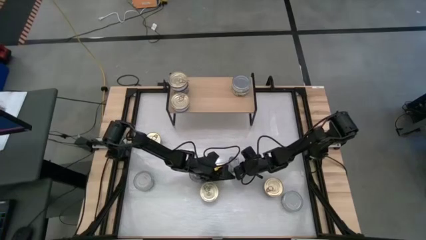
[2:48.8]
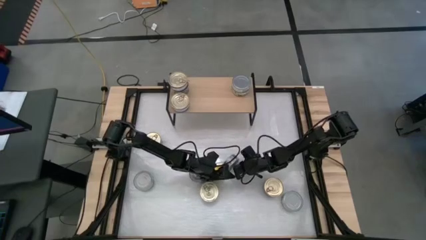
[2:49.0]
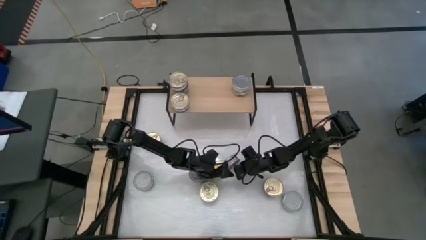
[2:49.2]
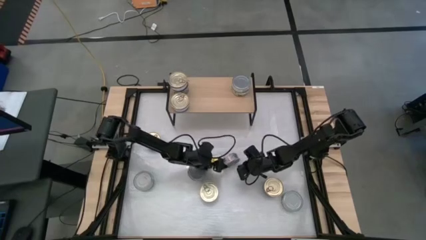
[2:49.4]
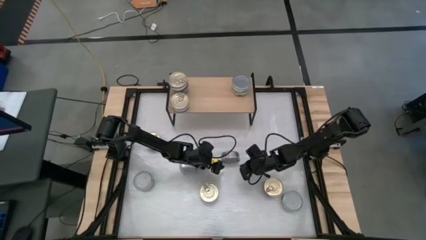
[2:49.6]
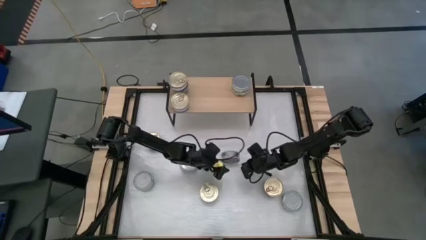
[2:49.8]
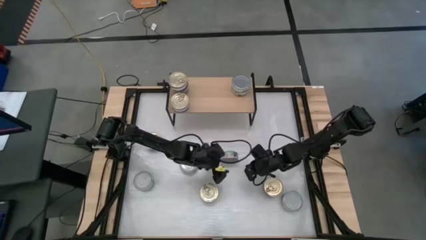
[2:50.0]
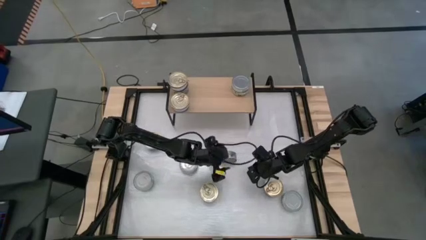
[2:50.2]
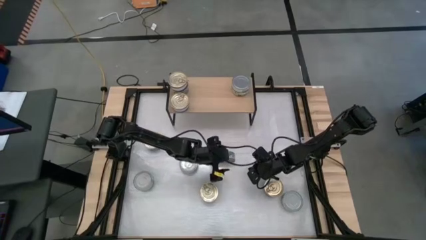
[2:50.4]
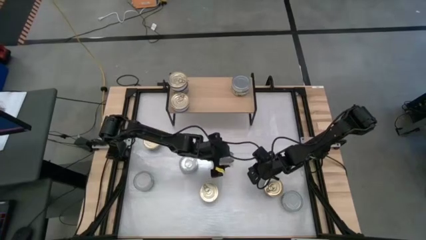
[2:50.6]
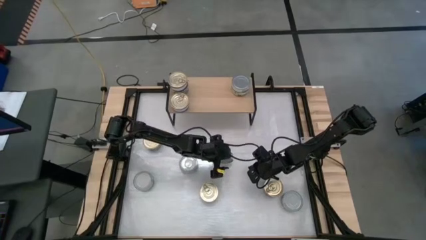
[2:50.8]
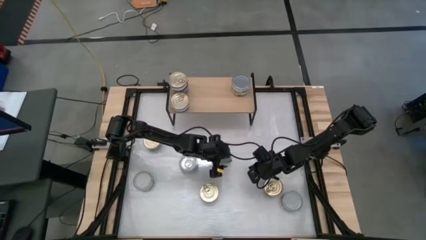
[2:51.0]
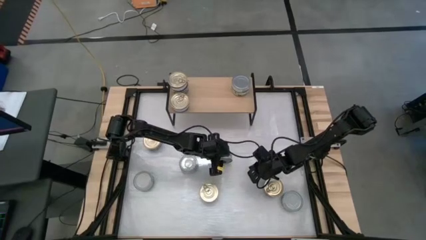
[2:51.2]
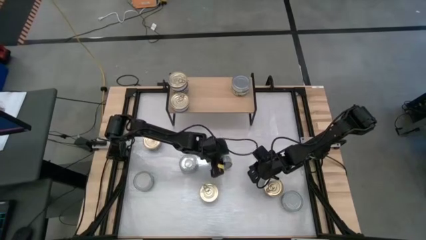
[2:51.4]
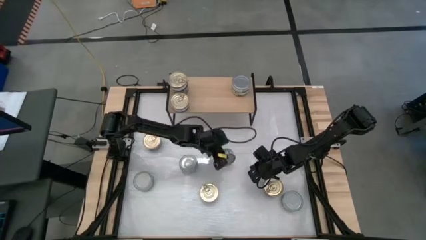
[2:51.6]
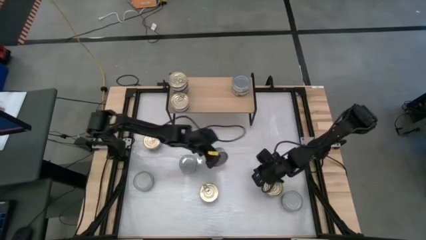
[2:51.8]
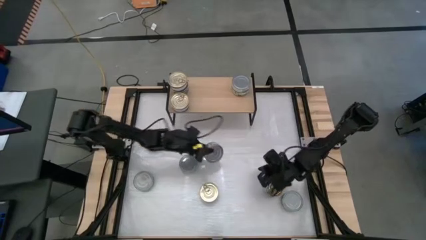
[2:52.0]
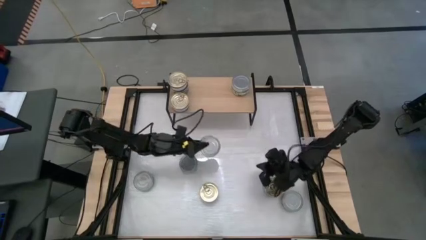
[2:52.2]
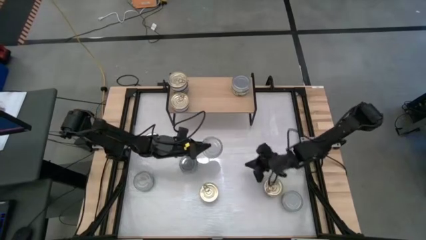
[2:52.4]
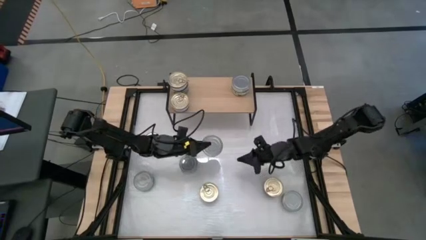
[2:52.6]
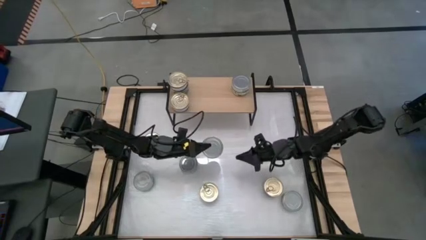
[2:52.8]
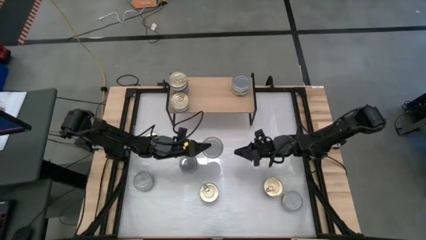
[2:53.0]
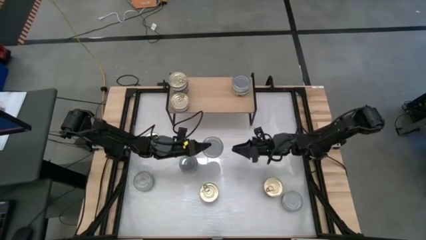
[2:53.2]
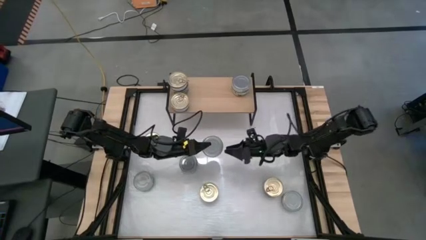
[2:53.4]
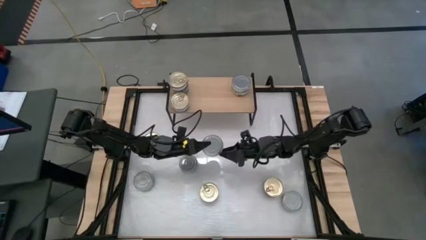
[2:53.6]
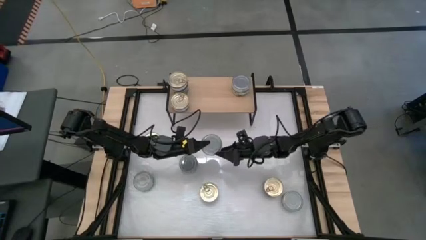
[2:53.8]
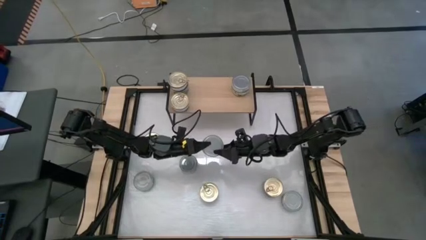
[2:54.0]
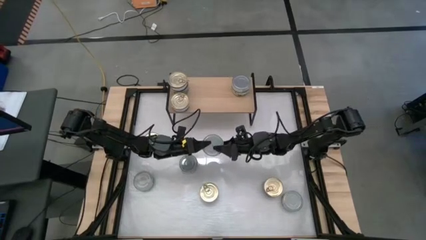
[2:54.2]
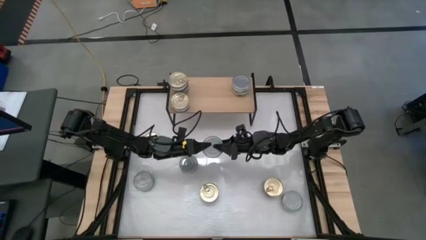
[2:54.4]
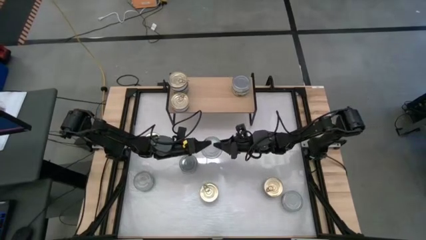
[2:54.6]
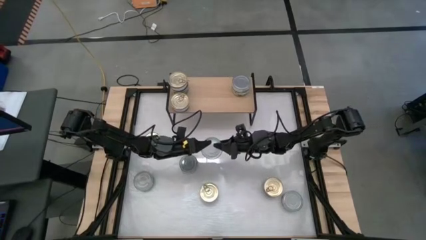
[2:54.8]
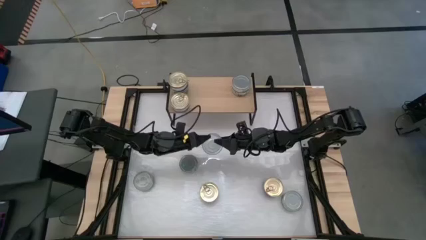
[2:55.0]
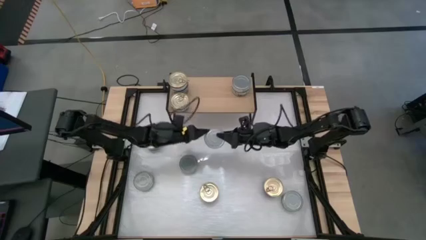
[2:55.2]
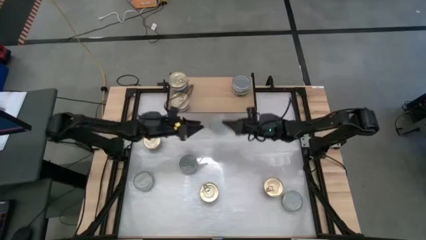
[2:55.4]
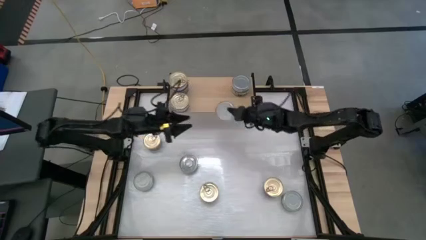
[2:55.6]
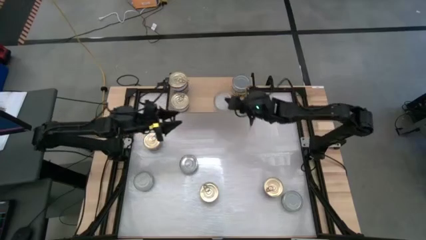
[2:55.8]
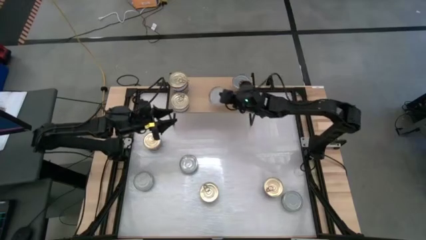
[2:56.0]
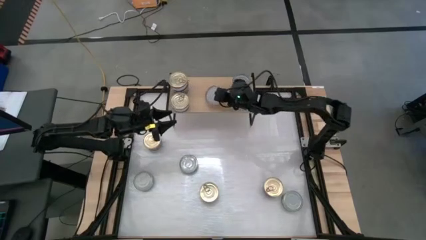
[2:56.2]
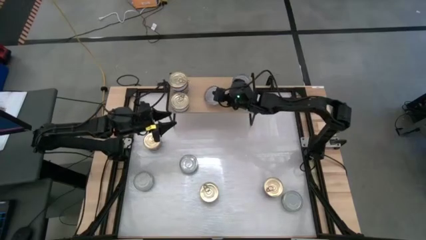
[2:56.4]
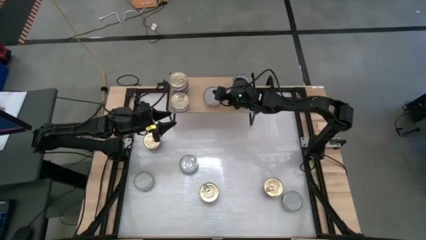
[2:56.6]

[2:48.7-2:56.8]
Task: Stack canned seafood by type on shelf
Put the green white tuna can on the shelf aligned with the stacked green white tuna cans

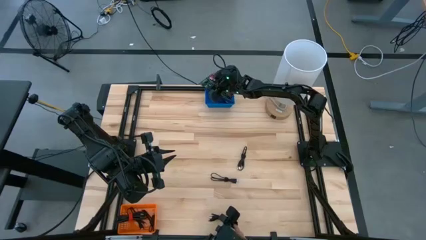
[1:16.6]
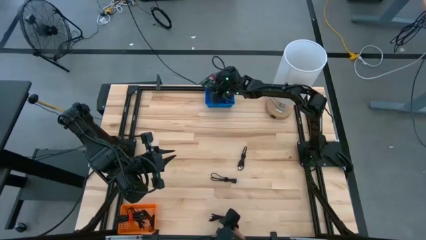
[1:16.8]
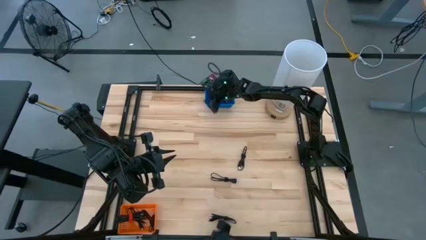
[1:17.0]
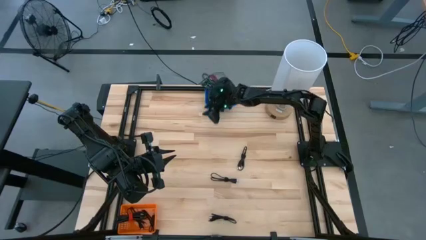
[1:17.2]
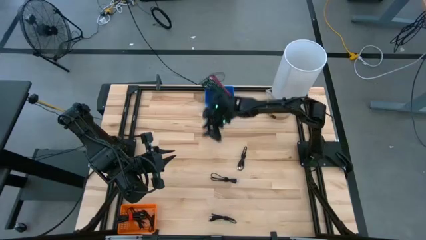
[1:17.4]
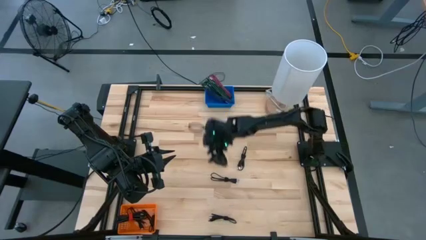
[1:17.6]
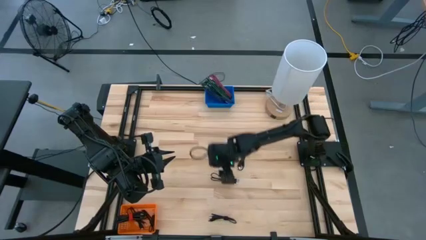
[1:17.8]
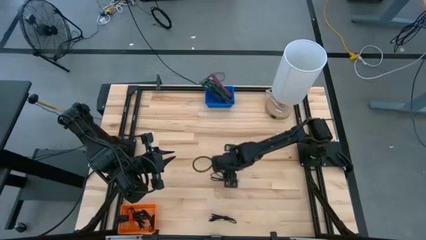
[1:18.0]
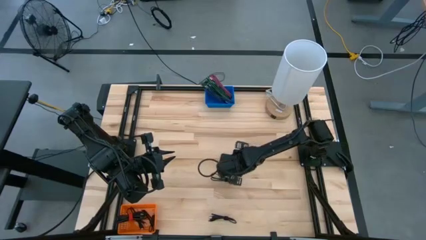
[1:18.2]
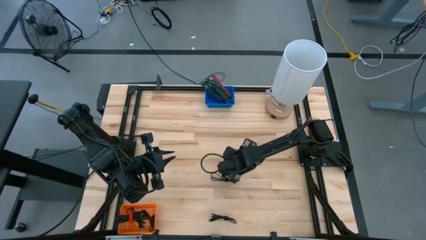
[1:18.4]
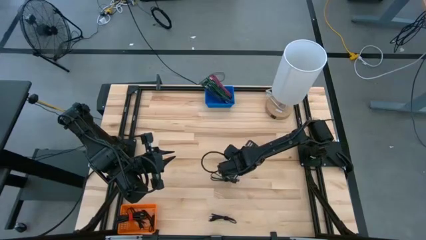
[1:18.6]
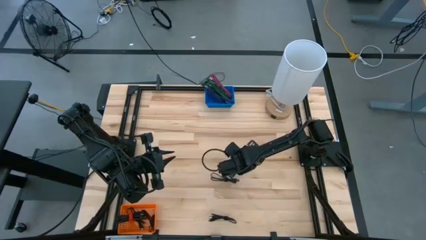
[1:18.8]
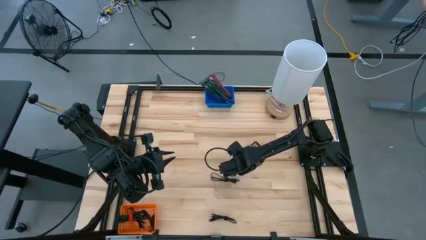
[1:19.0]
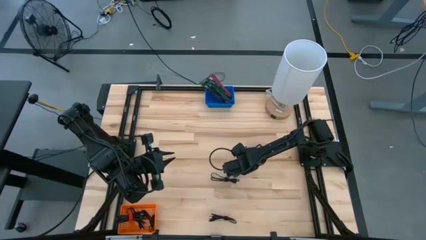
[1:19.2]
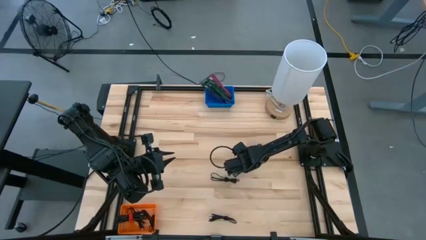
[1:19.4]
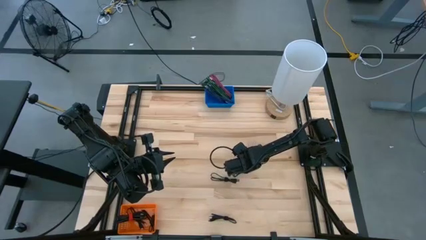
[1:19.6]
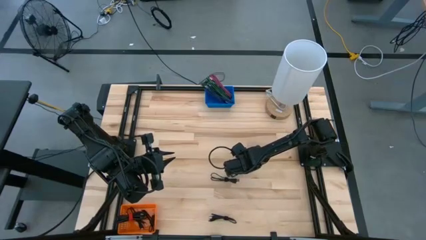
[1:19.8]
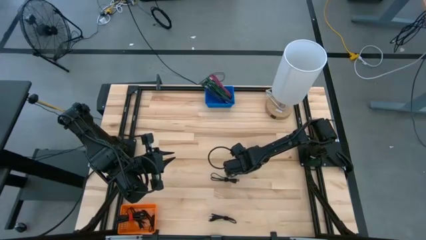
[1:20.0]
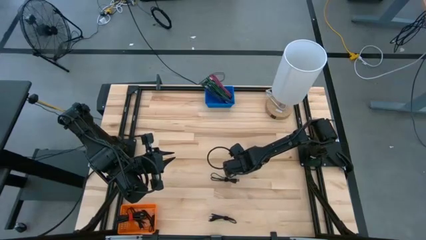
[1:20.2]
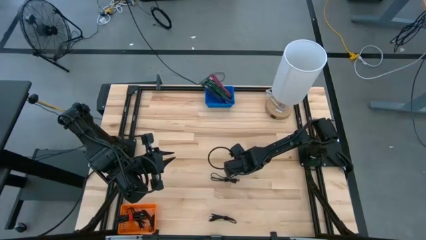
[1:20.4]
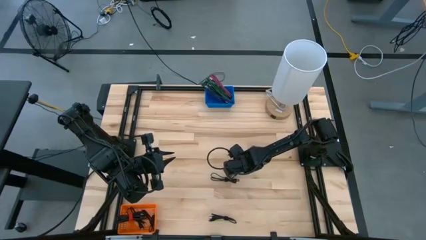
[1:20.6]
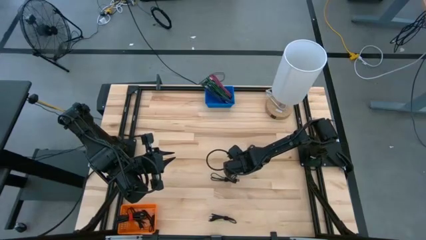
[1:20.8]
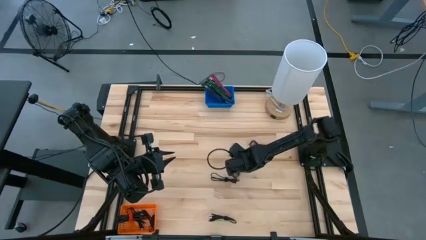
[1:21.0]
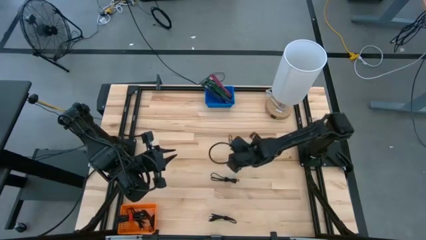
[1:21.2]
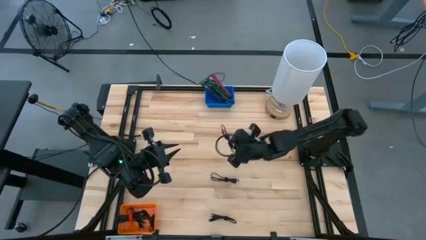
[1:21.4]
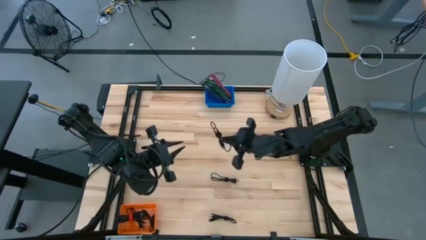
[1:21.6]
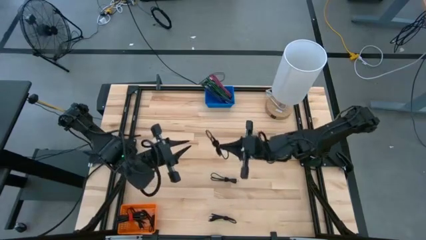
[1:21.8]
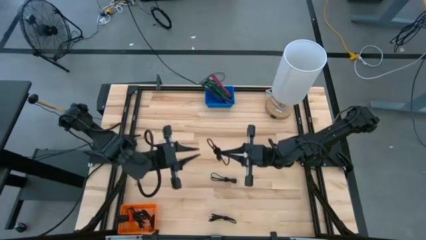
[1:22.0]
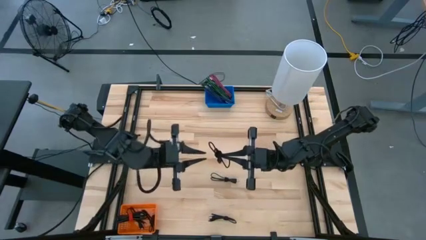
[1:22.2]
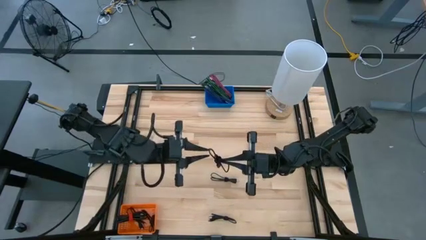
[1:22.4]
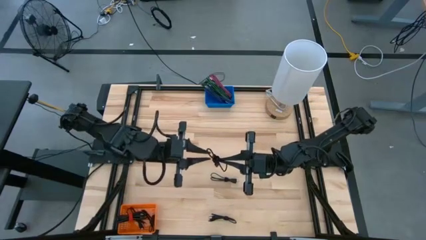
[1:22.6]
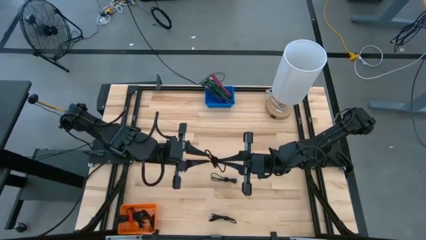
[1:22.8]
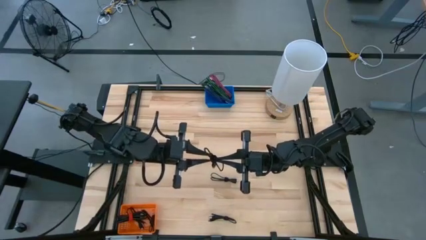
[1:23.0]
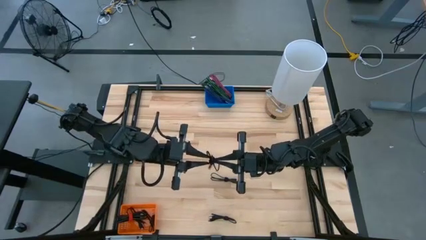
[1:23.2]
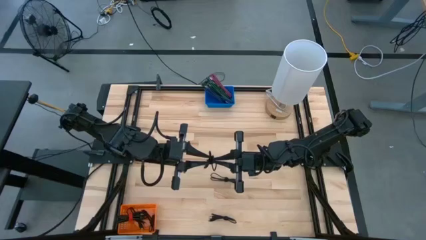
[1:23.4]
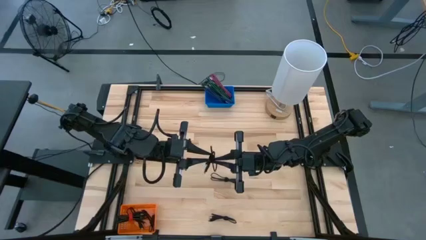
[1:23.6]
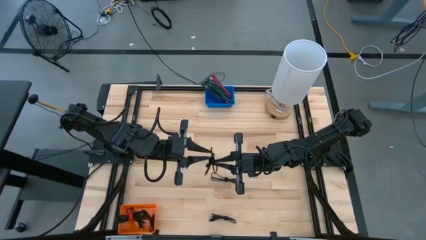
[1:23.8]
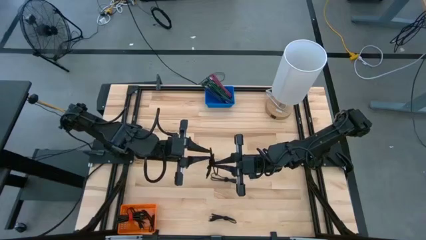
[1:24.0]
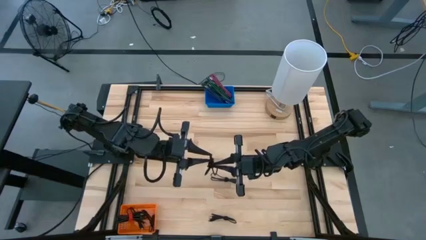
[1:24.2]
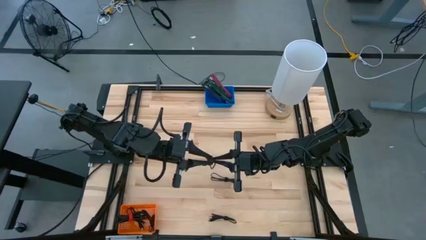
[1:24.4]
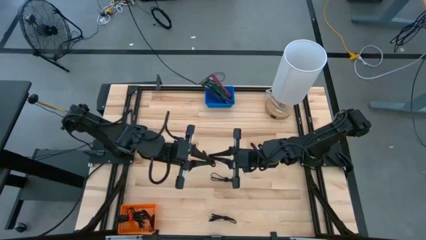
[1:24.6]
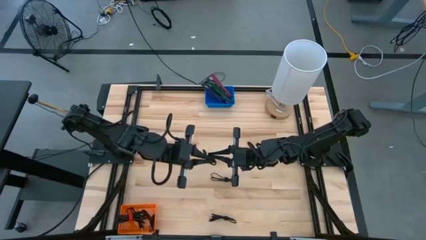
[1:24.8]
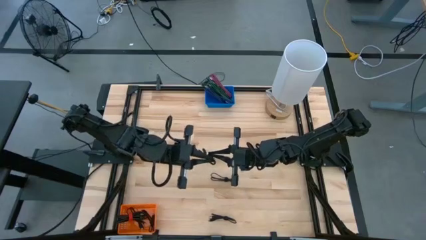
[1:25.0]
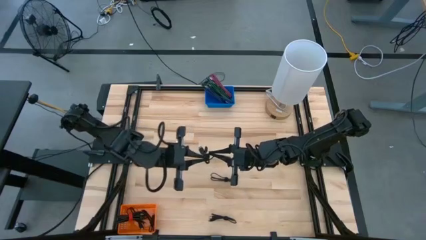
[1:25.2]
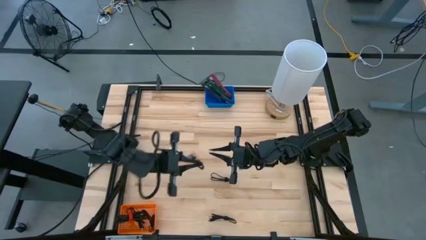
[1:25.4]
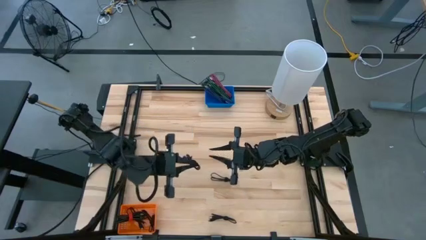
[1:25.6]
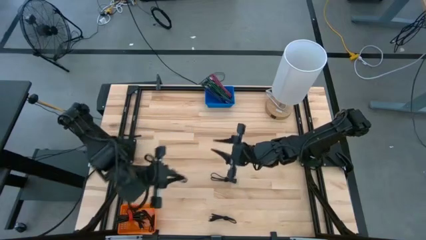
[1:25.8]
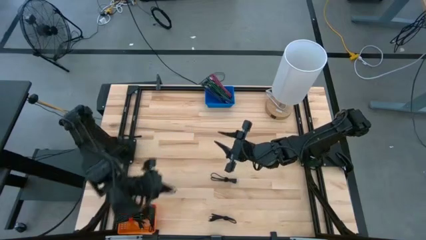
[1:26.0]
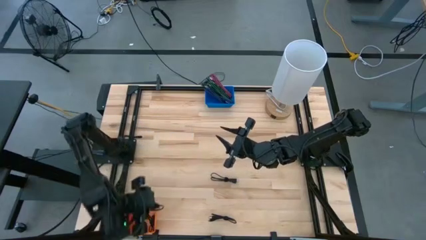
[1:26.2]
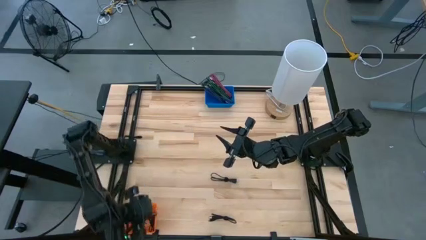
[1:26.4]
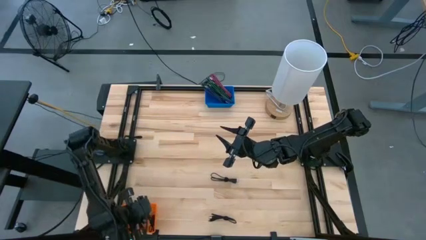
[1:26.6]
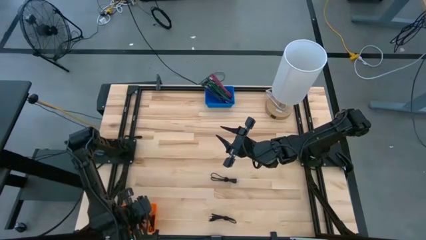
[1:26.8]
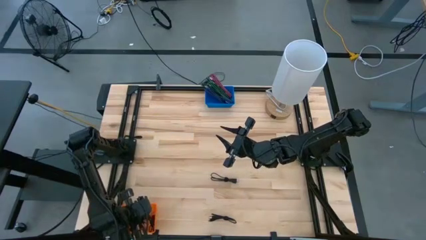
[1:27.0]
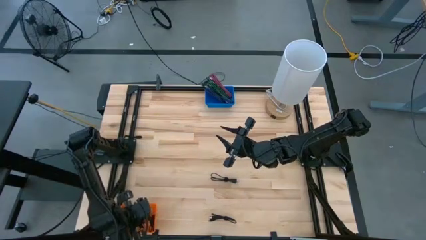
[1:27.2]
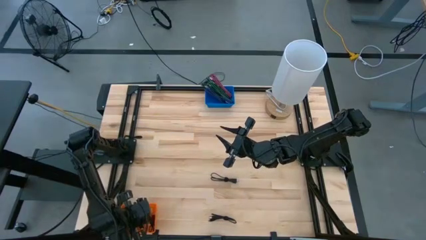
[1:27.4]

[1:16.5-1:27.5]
Task: Pick & Place USB Port
Put the black charger cable into the orange basket
